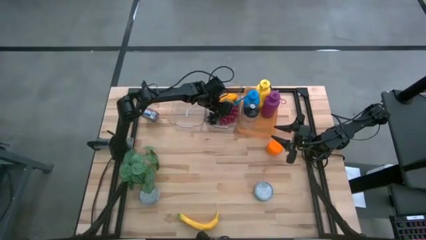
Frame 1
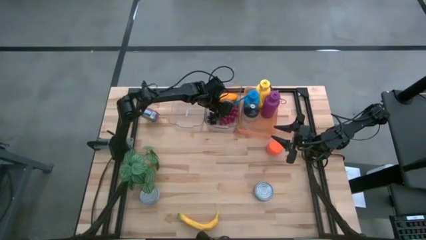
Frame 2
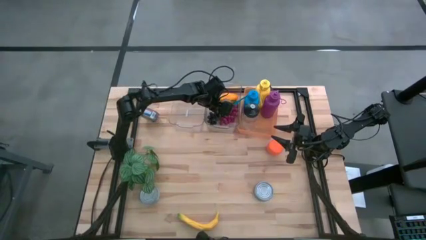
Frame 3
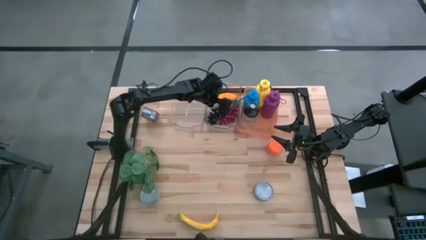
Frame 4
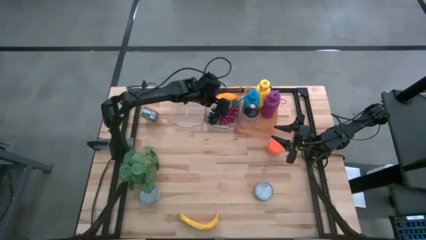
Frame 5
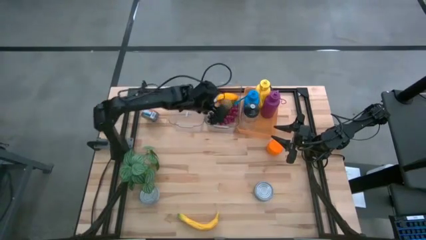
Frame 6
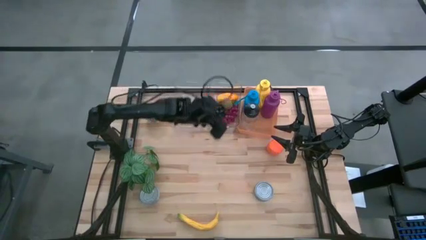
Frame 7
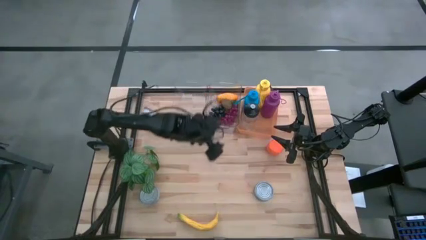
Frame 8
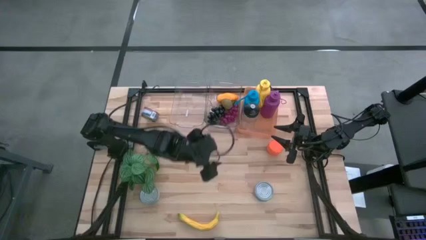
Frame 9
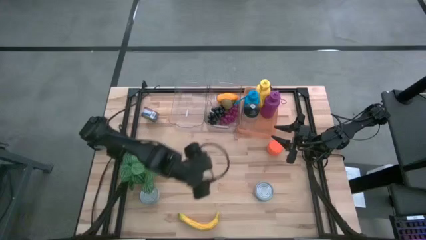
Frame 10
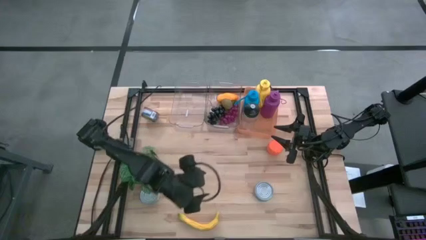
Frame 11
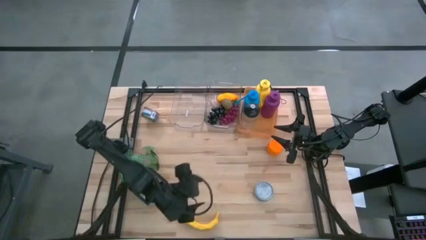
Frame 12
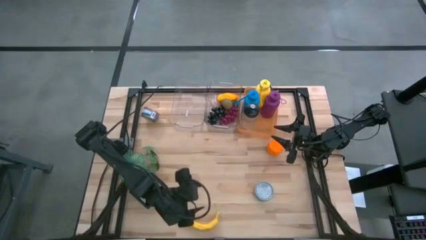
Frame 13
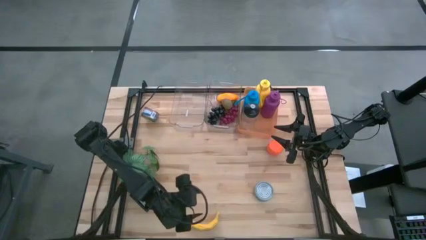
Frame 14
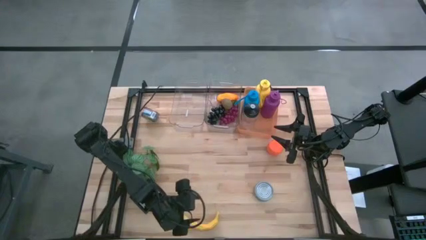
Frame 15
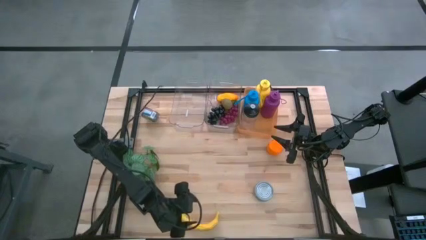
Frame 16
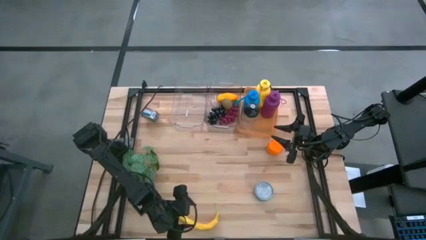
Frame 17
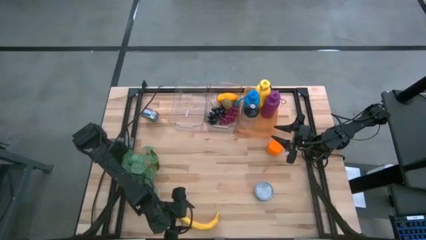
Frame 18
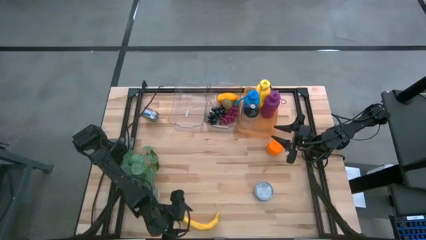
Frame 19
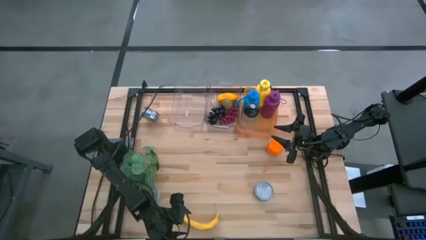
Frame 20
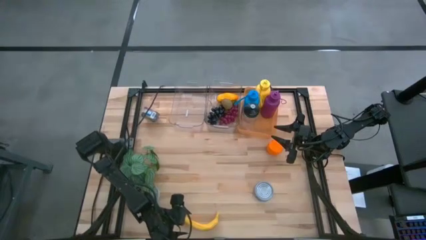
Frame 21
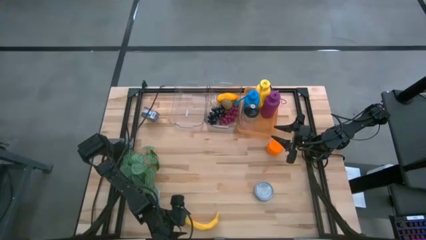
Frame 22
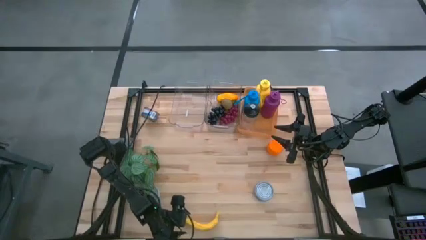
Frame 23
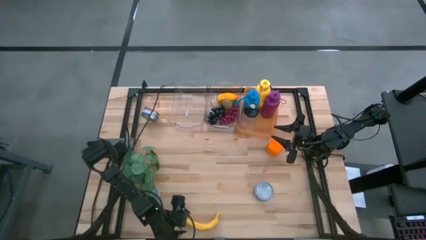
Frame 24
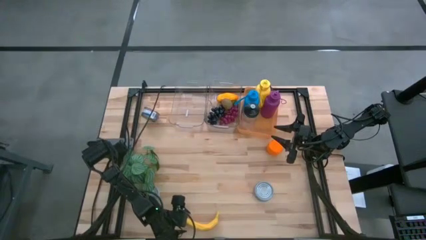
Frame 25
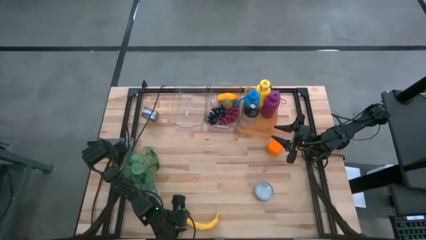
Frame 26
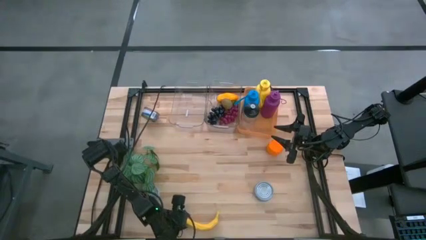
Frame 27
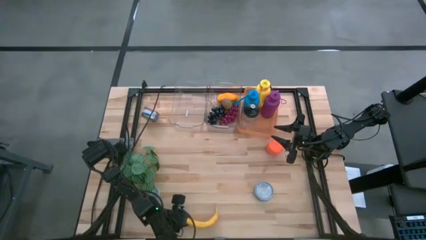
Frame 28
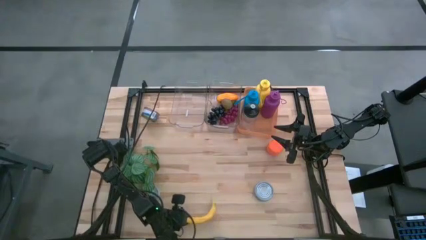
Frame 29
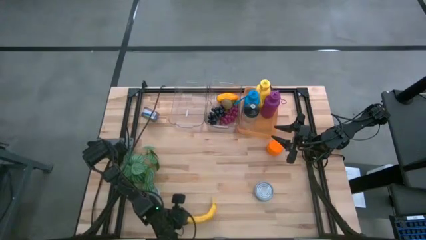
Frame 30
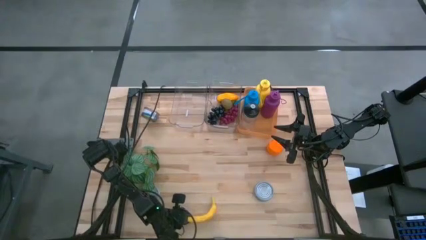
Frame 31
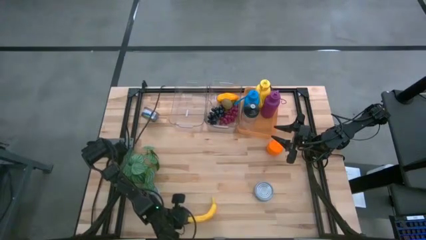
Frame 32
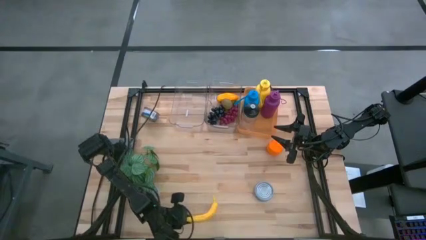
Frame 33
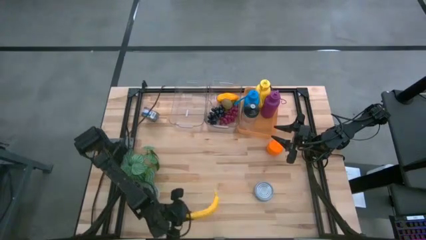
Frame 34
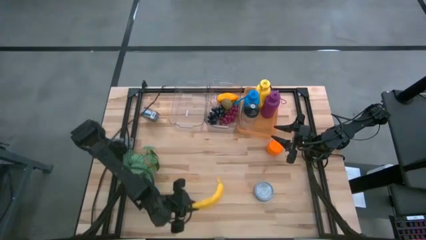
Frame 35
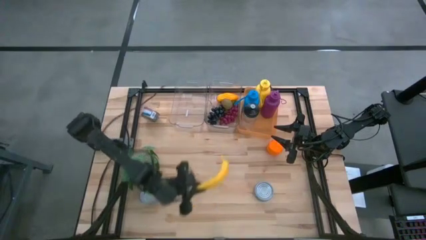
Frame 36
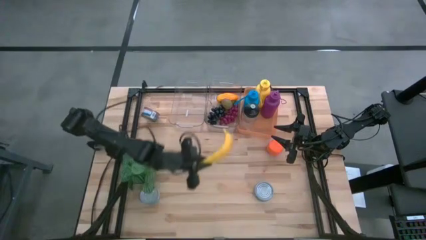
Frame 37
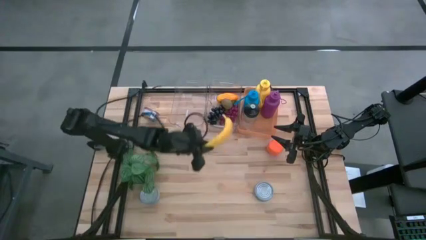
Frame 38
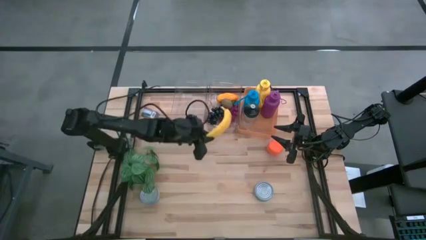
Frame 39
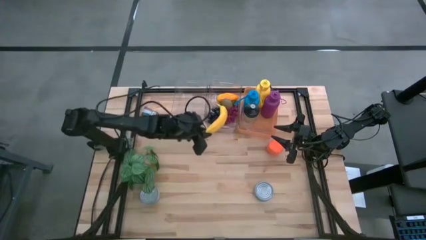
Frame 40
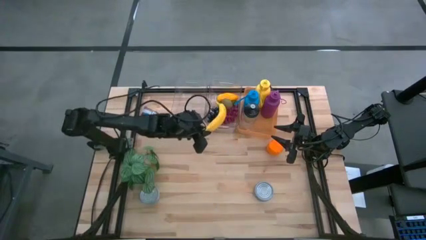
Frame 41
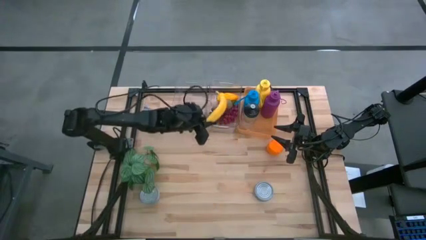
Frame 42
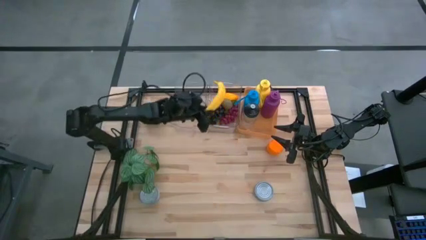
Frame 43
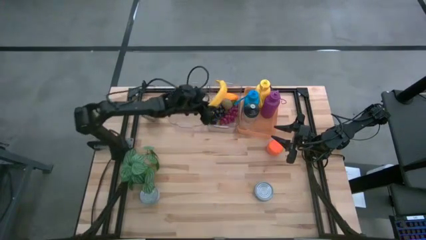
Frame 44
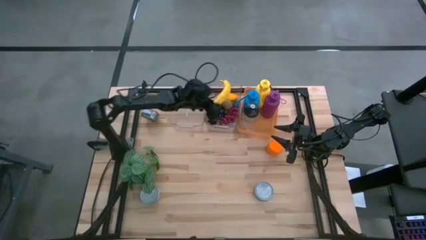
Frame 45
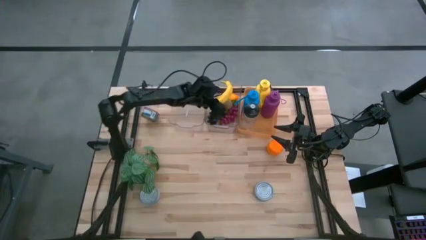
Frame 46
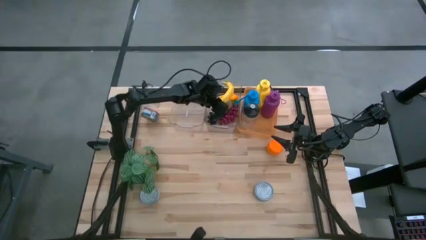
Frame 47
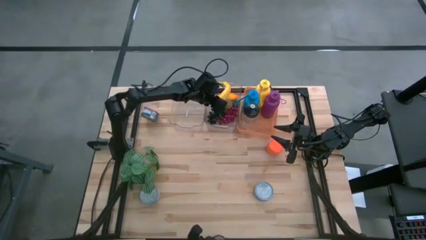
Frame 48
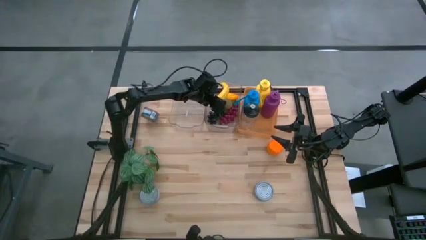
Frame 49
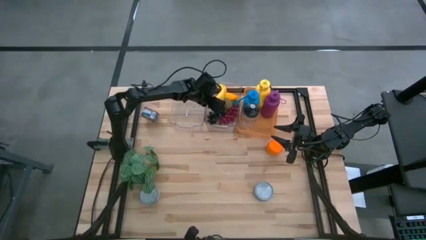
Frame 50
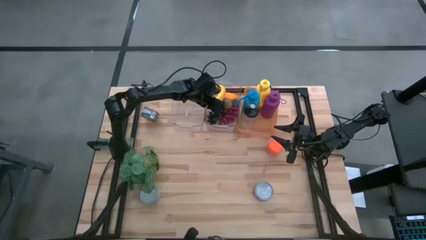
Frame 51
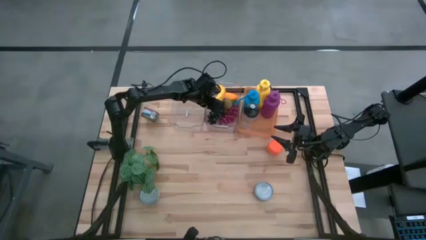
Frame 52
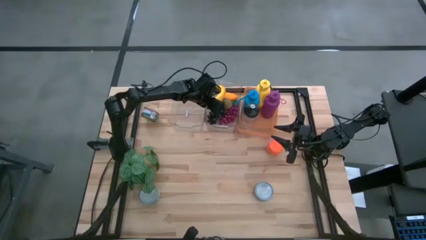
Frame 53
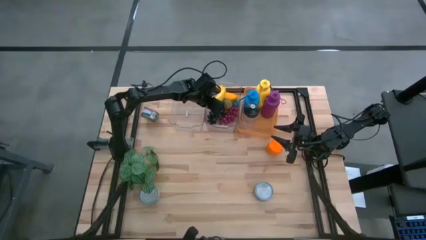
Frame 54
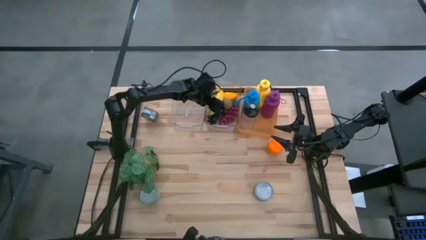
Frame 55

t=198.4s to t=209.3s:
Task: Pick & Place Food Item
Put the yellow banana into the right transparent bin
